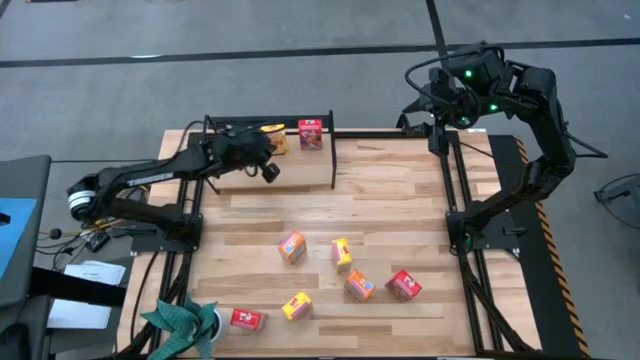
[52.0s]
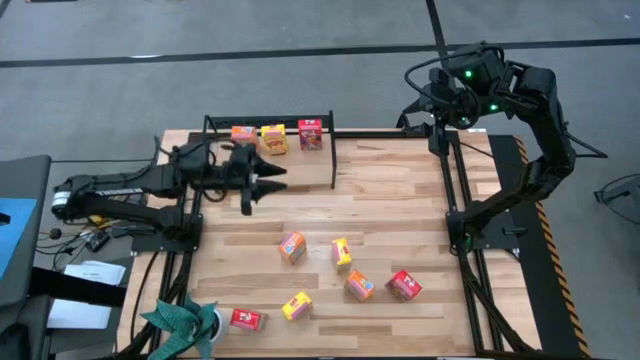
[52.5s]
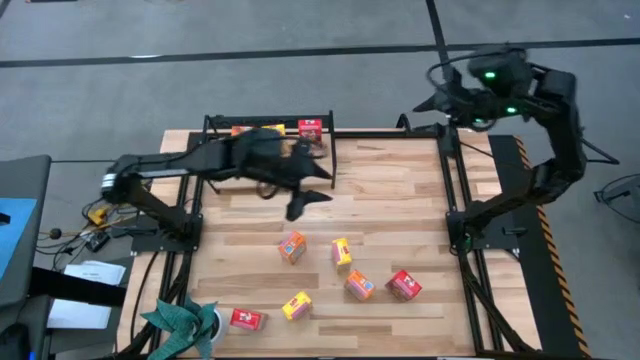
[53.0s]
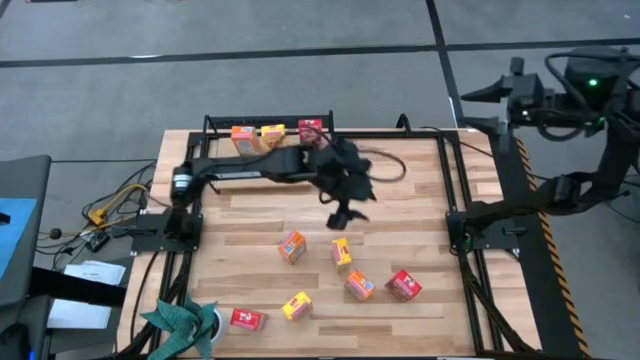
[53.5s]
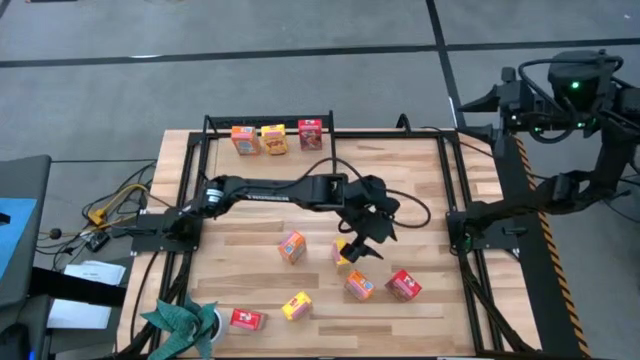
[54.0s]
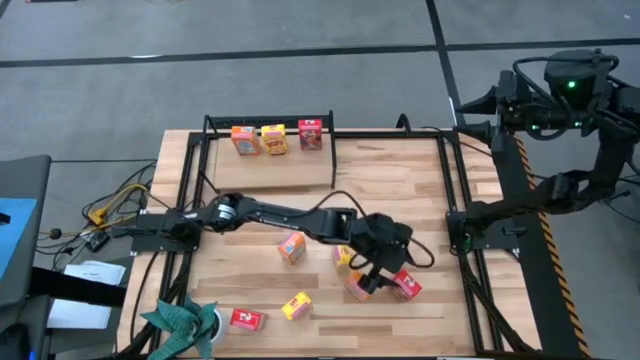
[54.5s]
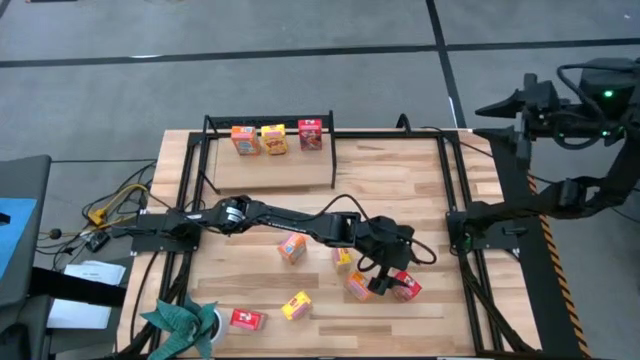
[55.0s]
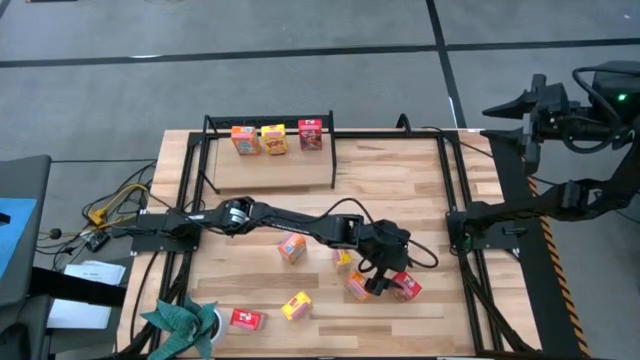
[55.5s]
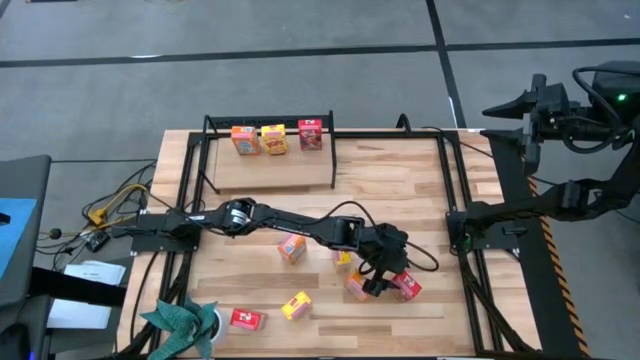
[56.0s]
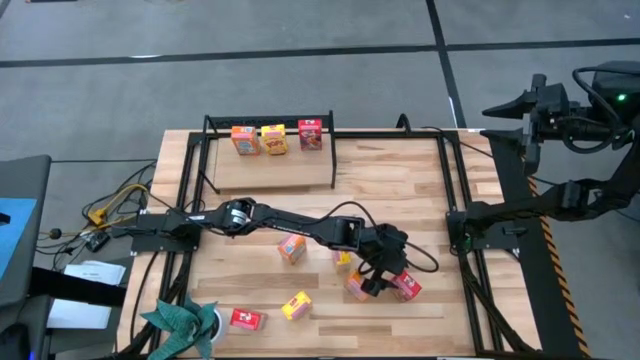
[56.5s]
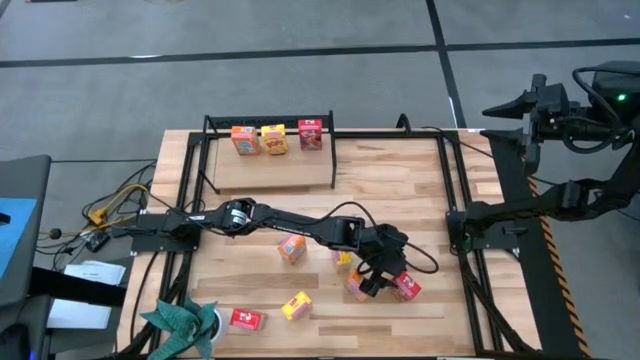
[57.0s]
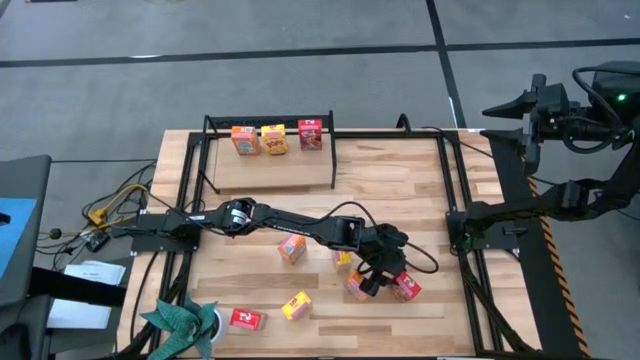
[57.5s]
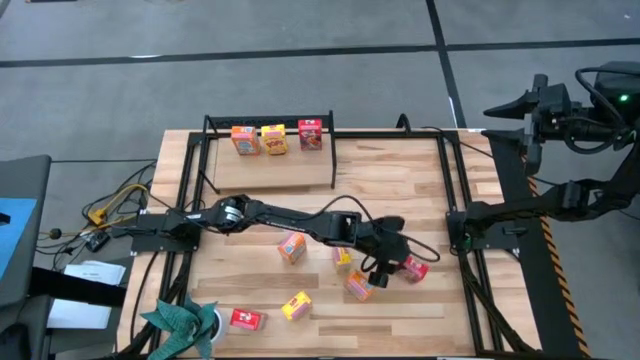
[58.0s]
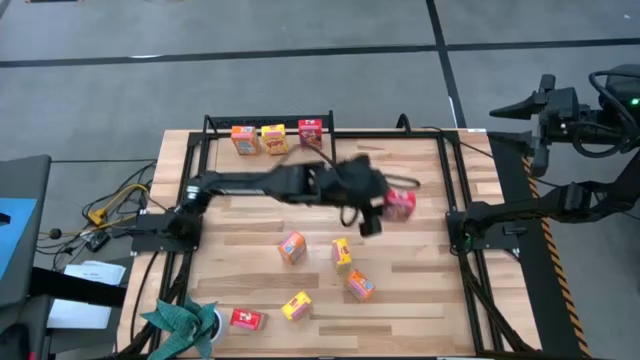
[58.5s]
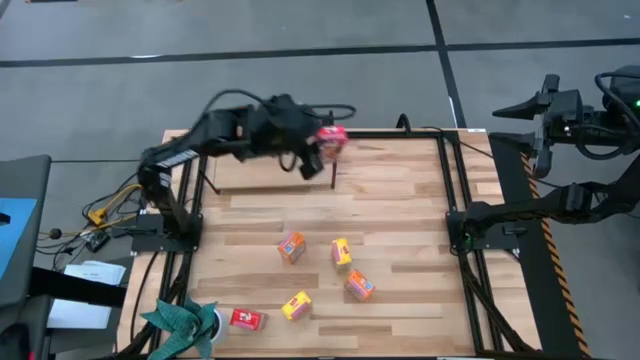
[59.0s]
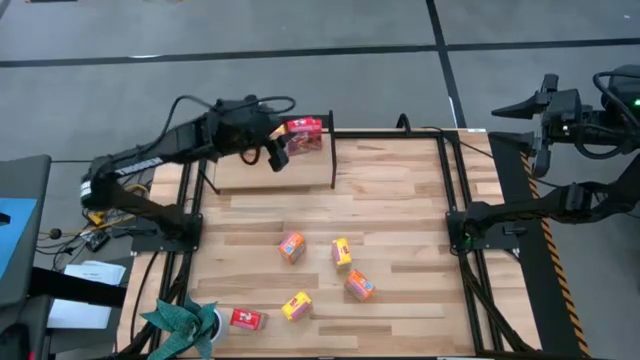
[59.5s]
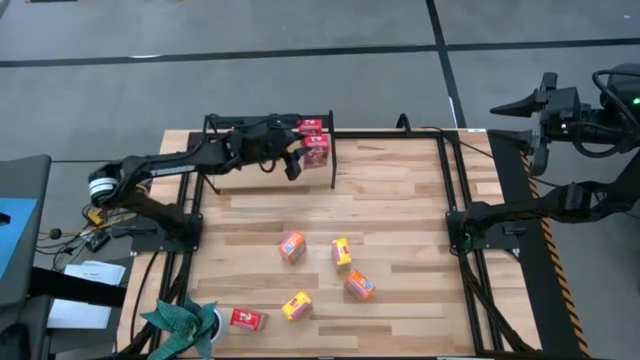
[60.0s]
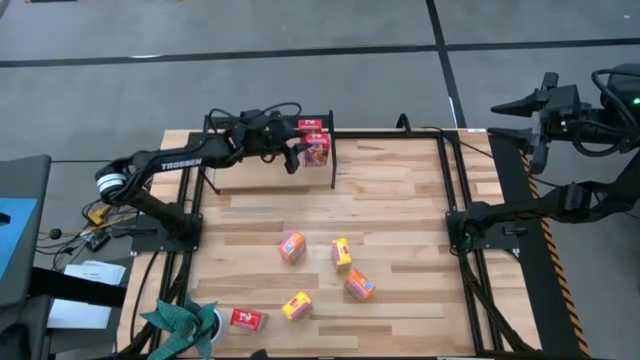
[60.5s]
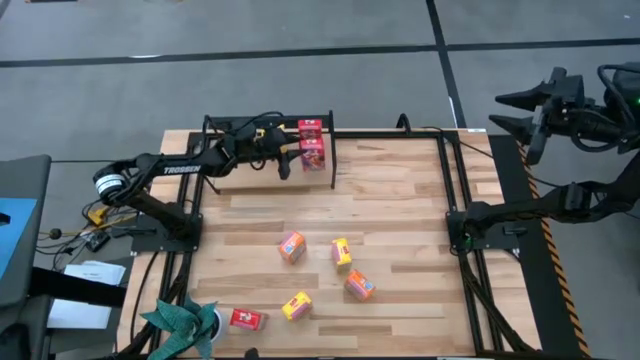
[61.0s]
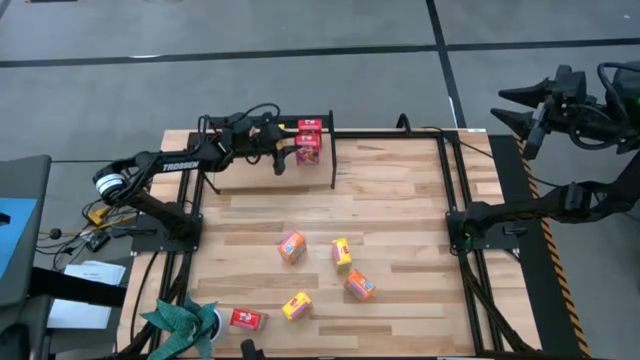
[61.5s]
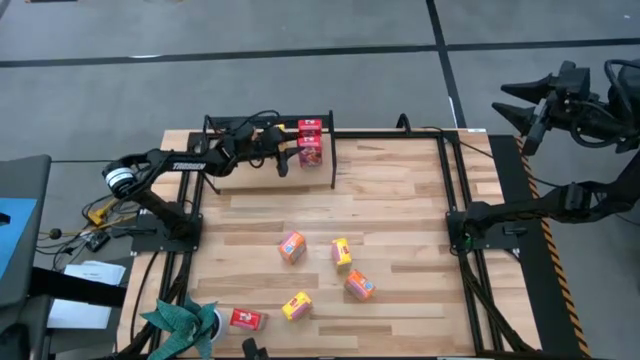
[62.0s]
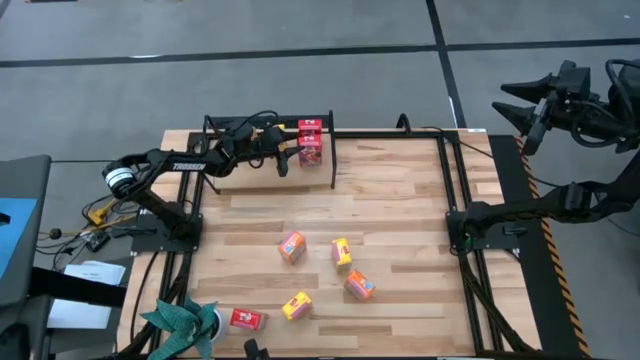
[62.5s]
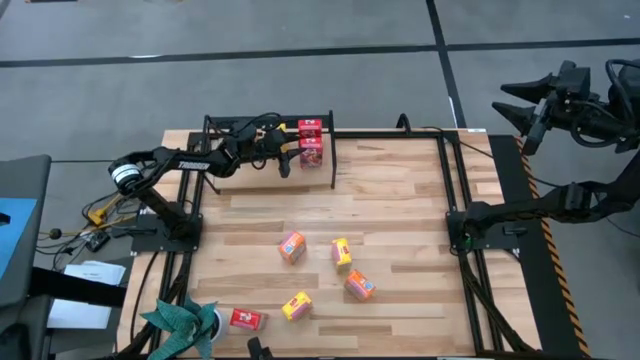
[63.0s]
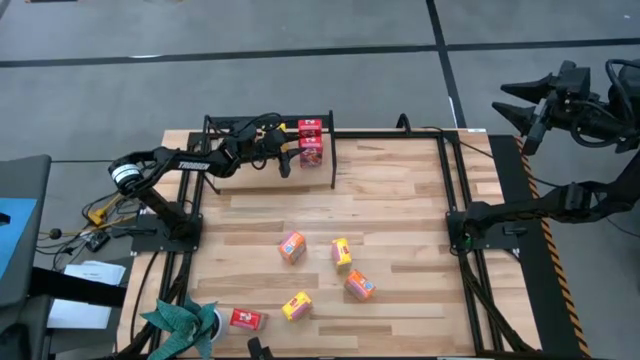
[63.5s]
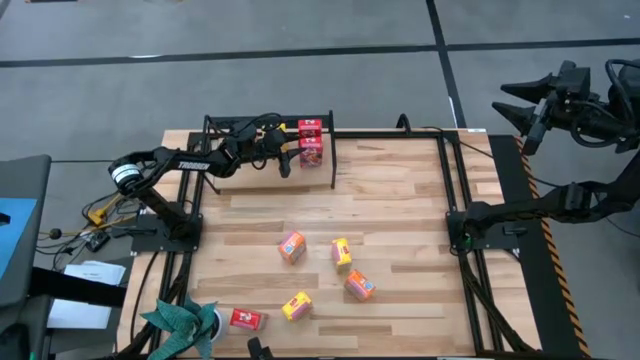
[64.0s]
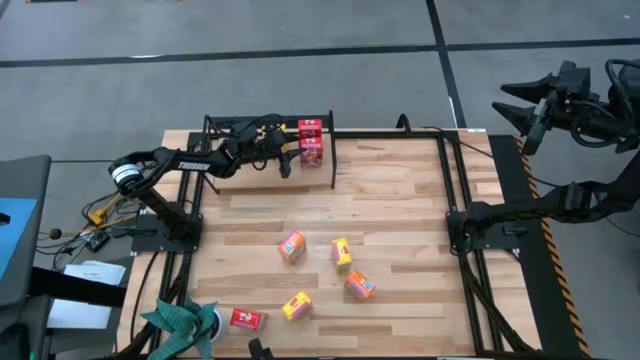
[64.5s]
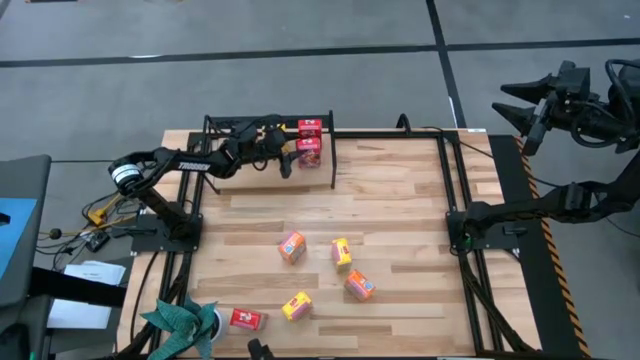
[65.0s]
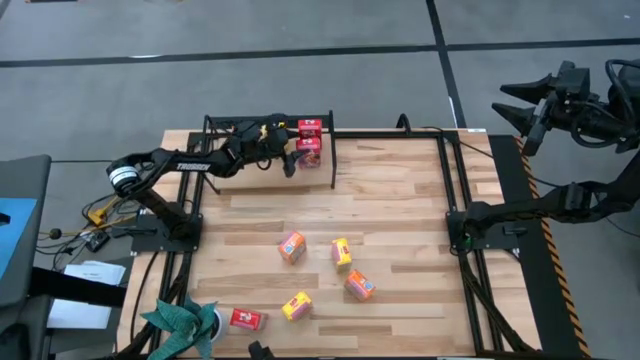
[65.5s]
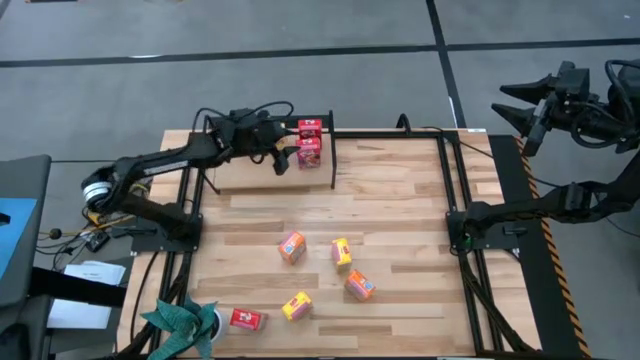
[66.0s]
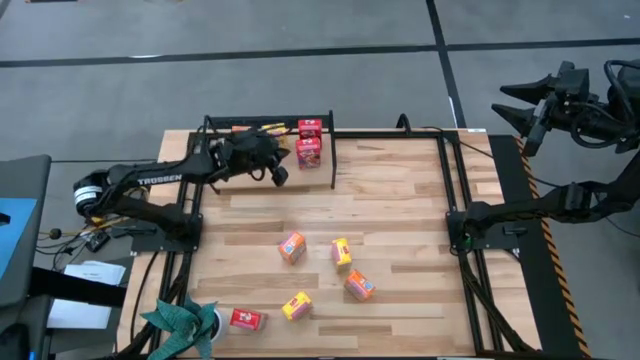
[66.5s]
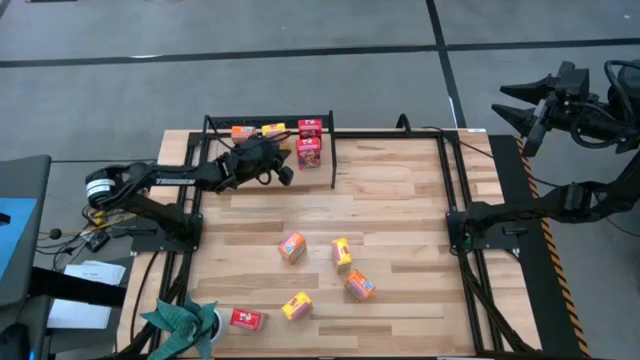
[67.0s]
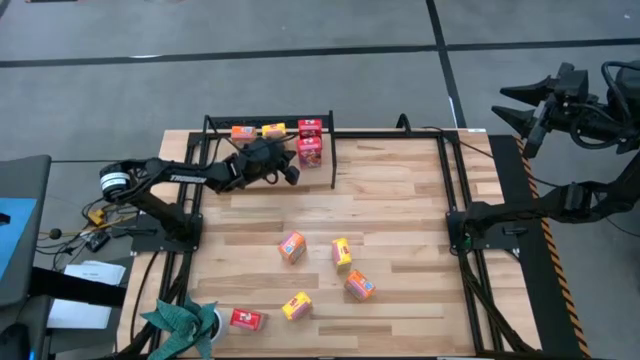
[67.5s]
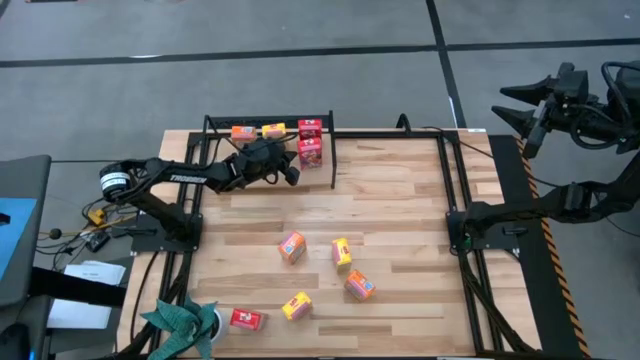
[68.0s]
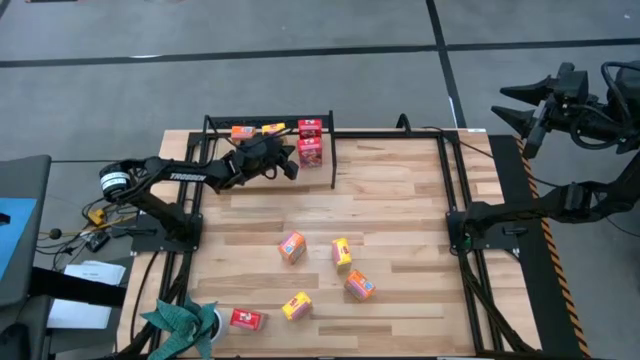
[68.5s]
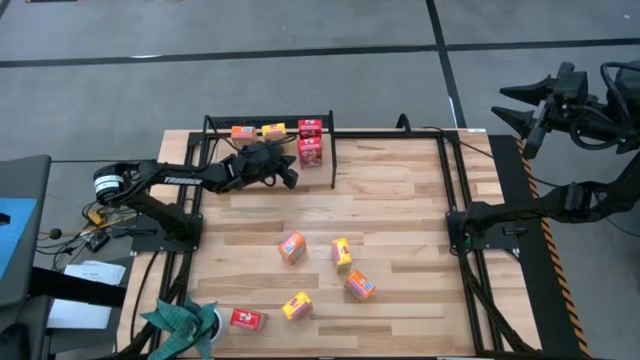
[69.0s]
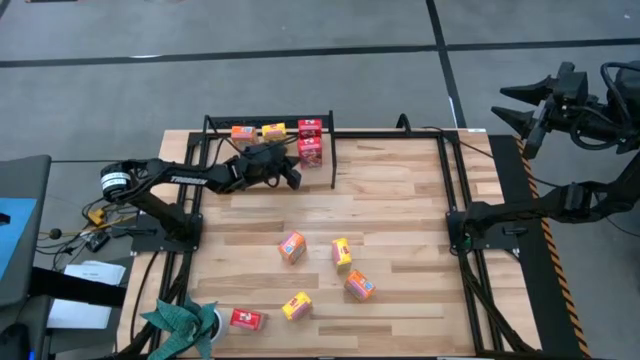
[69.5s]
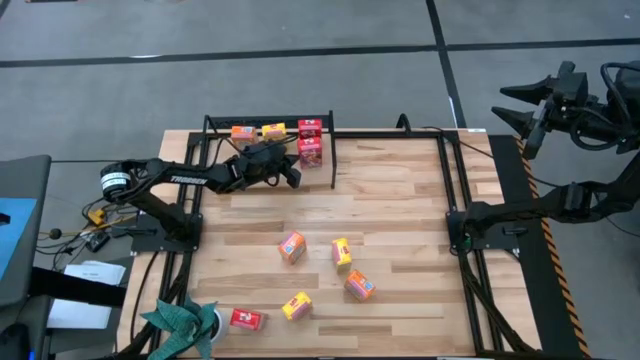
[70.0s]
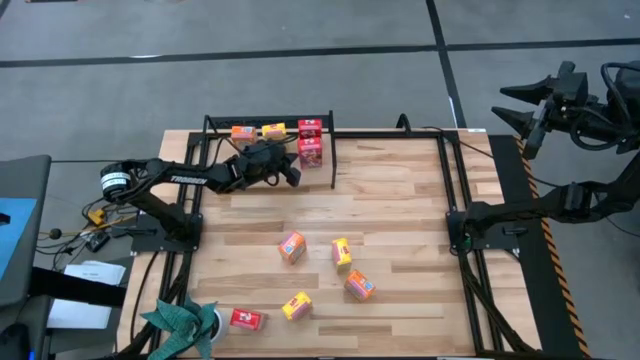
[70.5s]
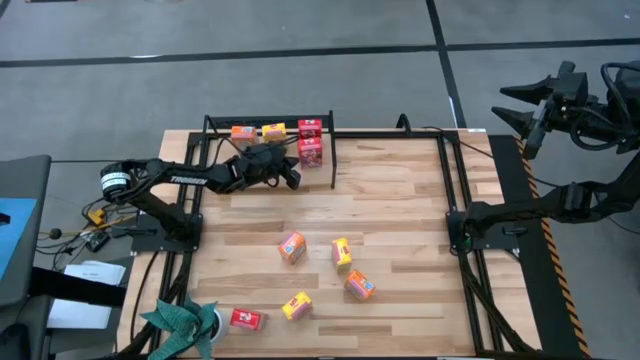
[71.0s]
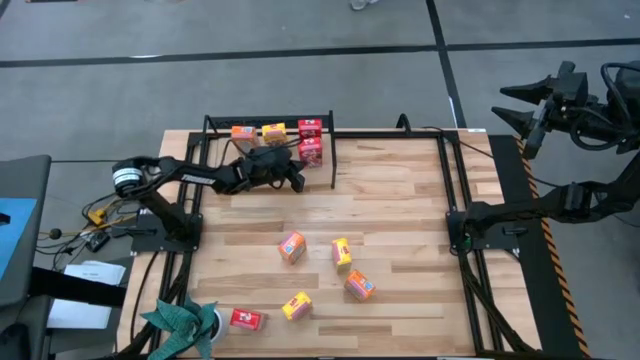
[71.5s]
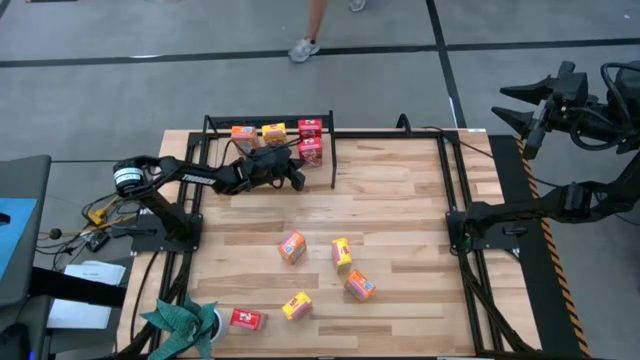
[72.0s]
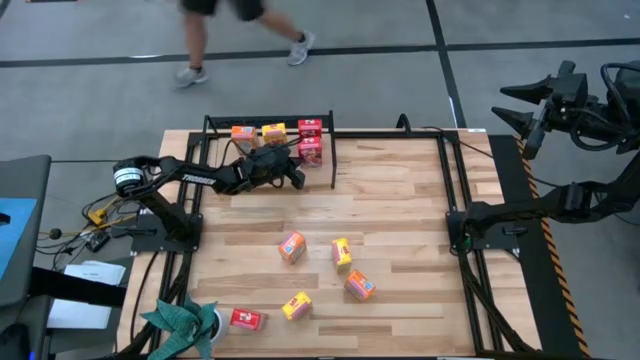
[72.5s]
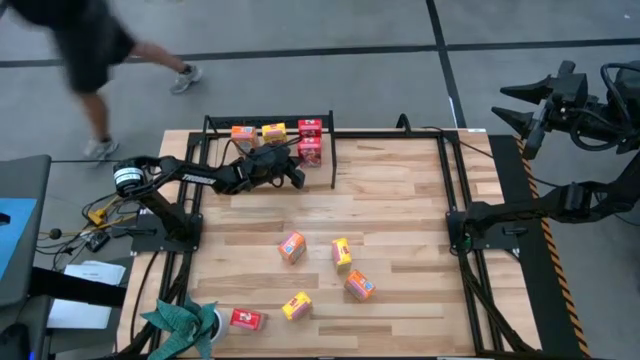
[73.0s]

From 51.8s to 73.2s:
Task: Stack cereal on shelf
Put the top red cereal box on the shelf aligned with the other red cereal box

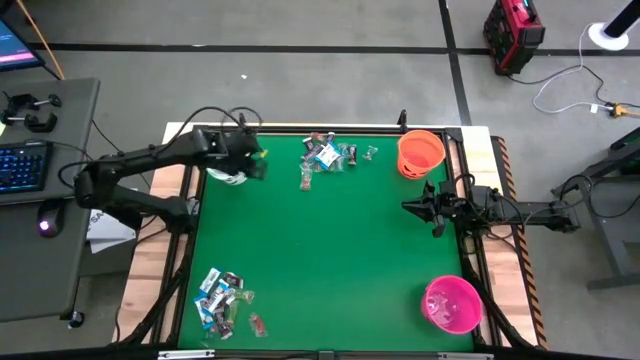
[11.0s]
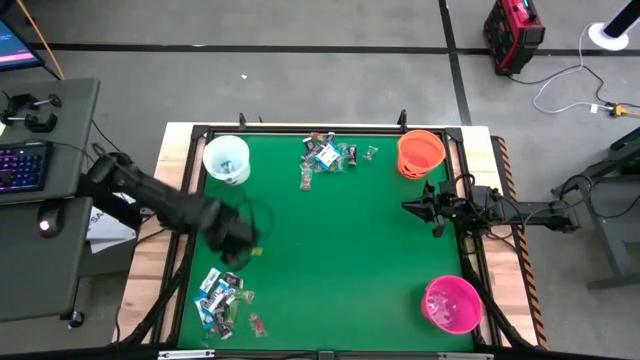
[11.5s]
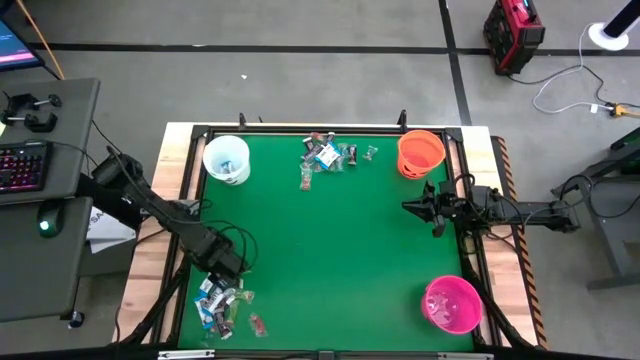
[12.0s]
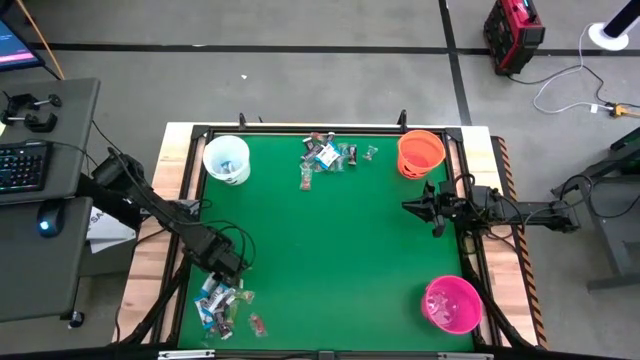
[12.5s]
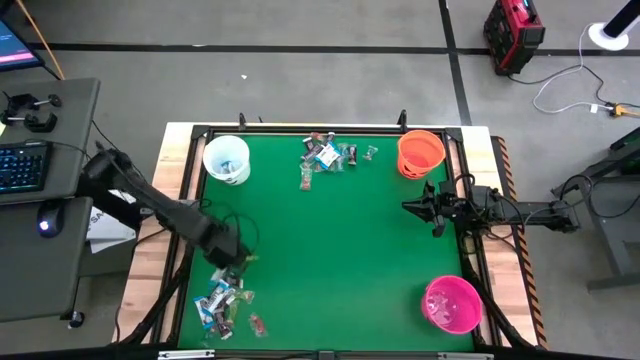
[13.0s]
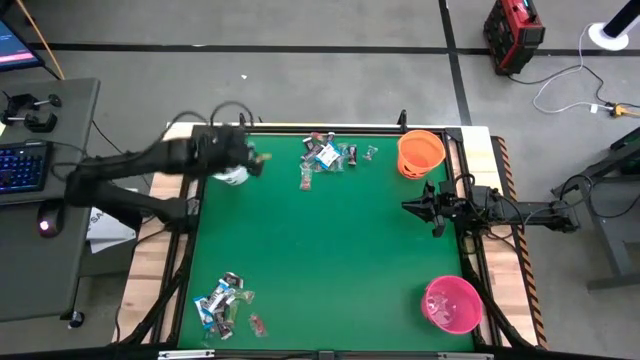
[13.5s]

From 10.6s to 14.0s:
Task: Sort candy by brand, put in halloween buckets
Put the white chocolate bar into the white bucket
